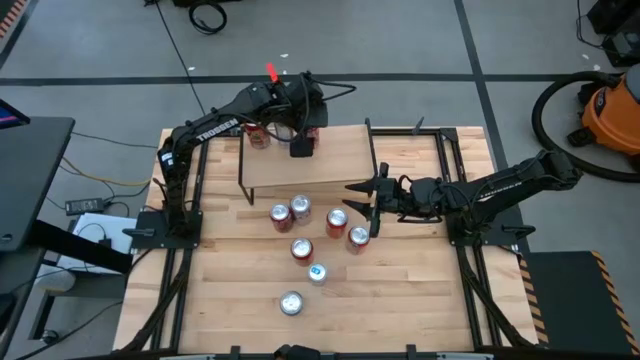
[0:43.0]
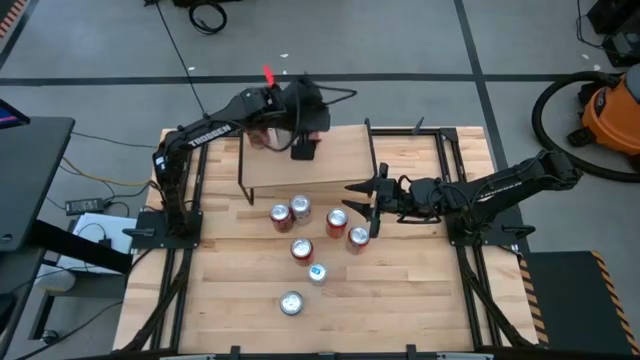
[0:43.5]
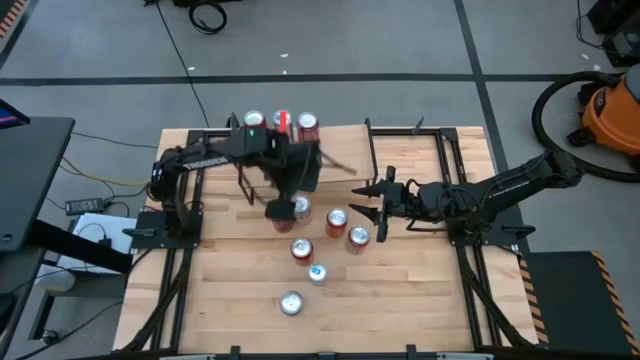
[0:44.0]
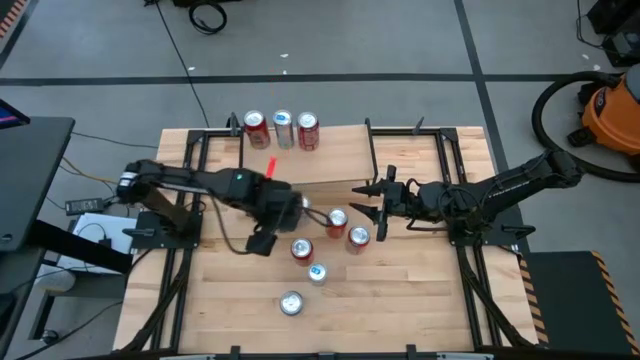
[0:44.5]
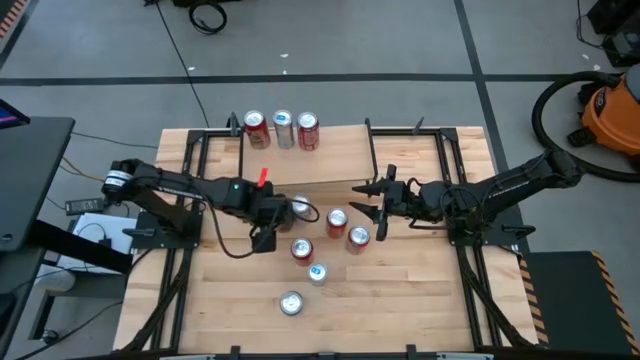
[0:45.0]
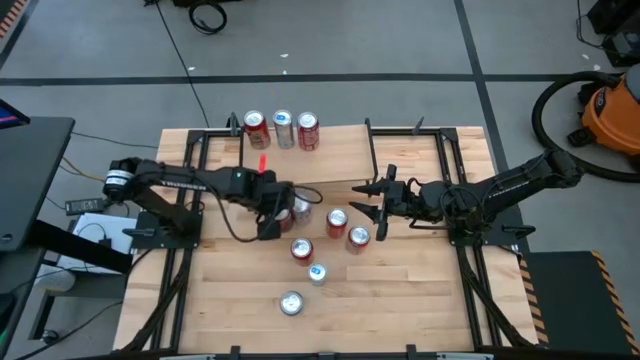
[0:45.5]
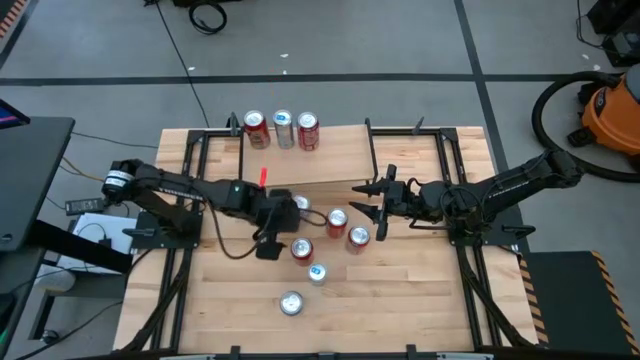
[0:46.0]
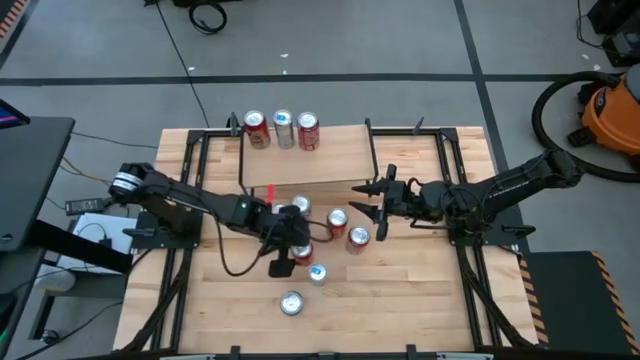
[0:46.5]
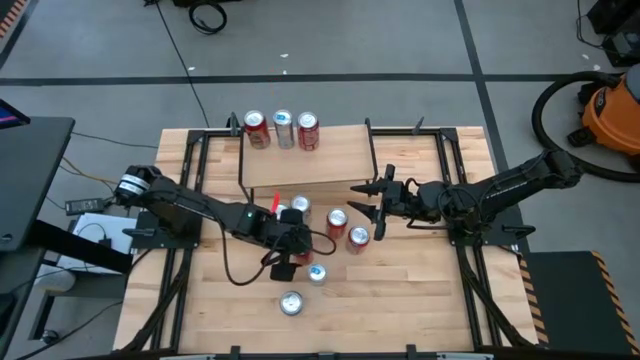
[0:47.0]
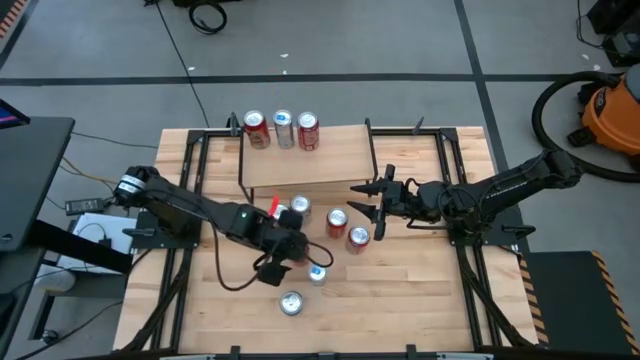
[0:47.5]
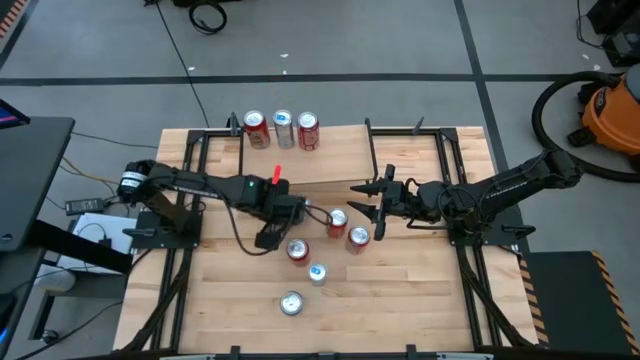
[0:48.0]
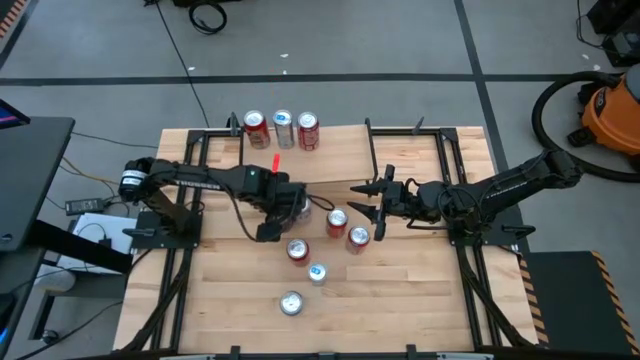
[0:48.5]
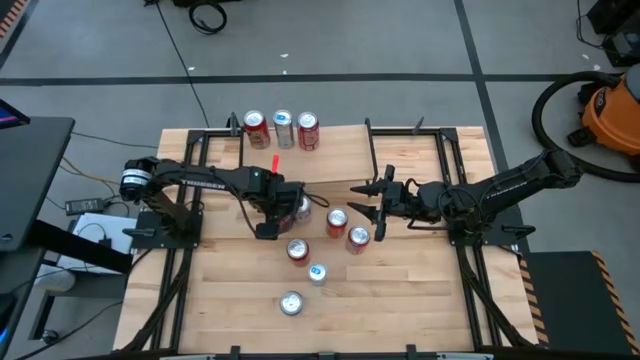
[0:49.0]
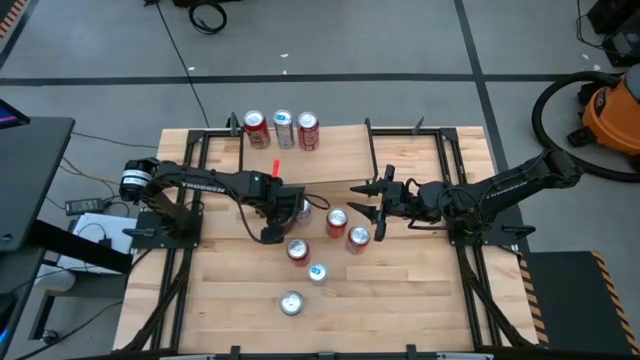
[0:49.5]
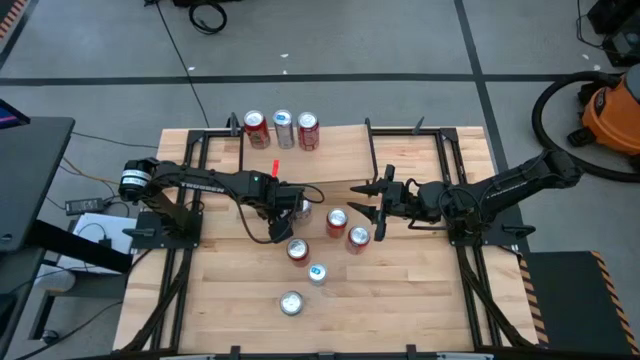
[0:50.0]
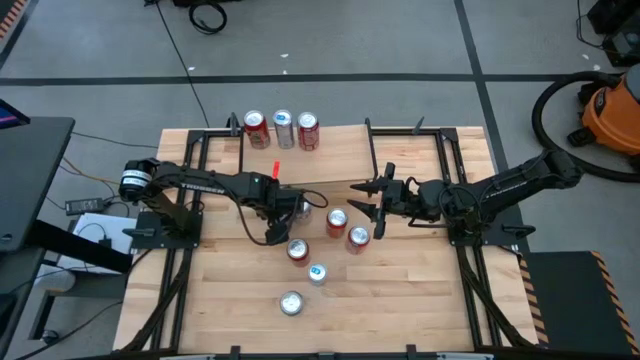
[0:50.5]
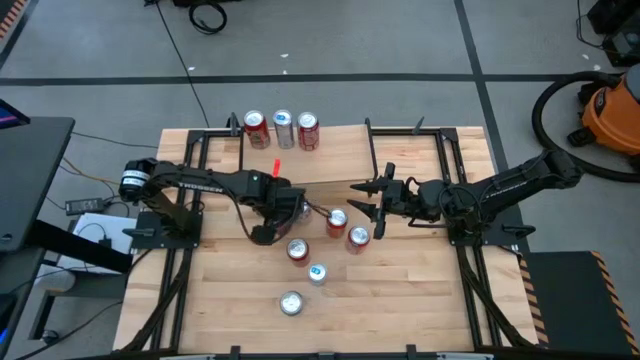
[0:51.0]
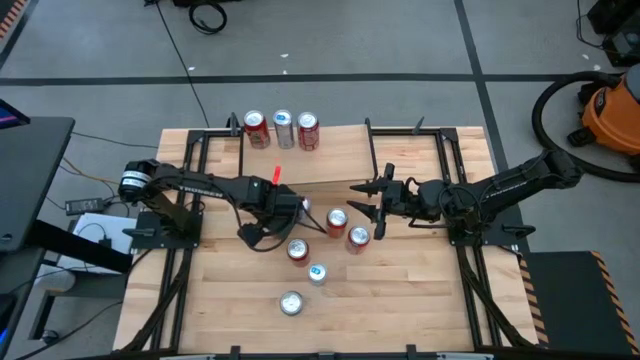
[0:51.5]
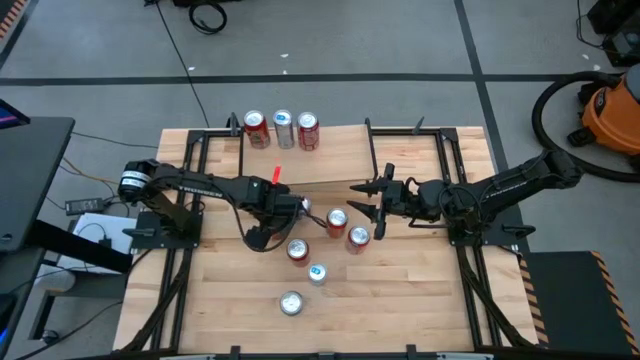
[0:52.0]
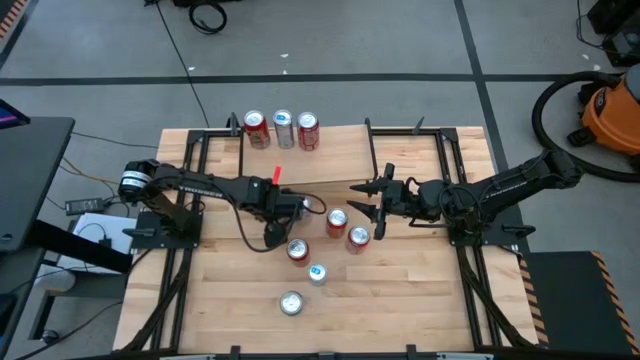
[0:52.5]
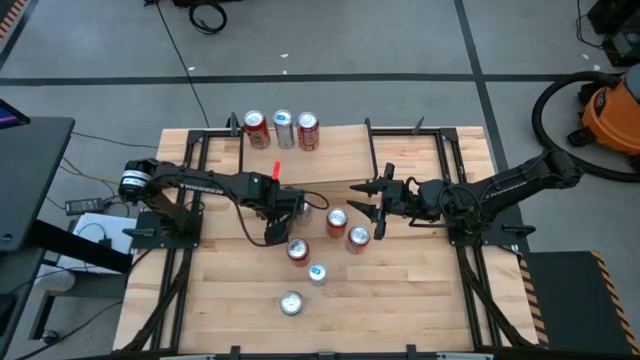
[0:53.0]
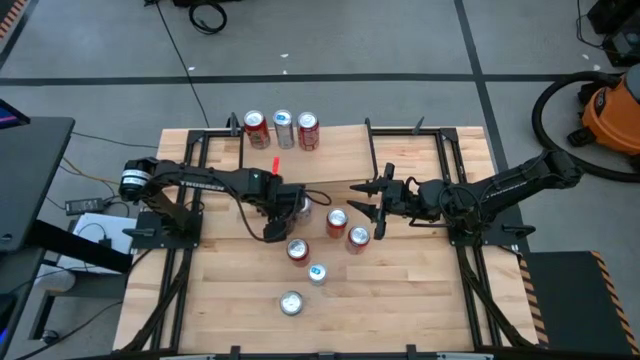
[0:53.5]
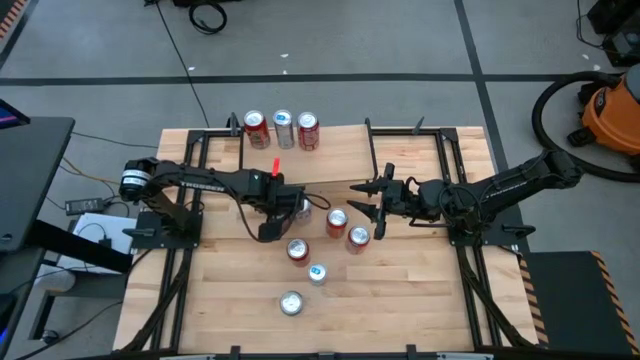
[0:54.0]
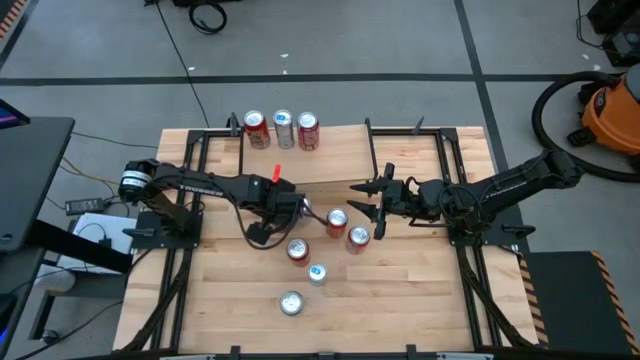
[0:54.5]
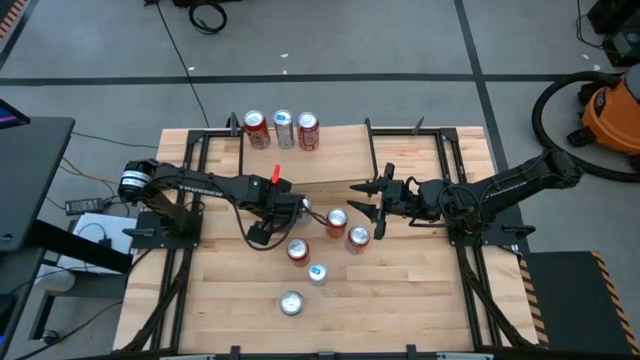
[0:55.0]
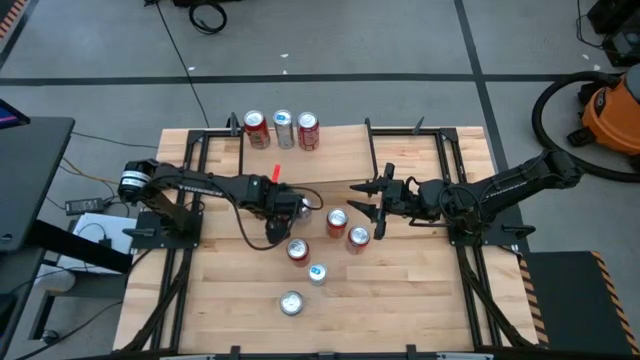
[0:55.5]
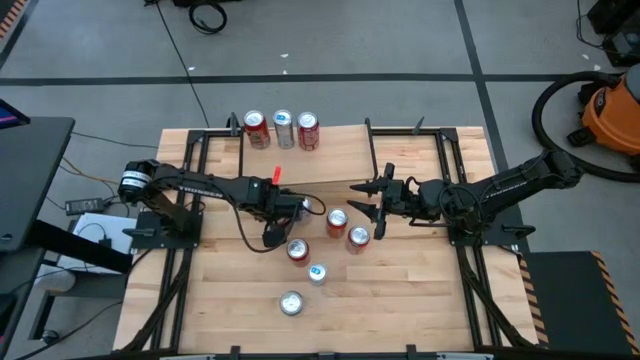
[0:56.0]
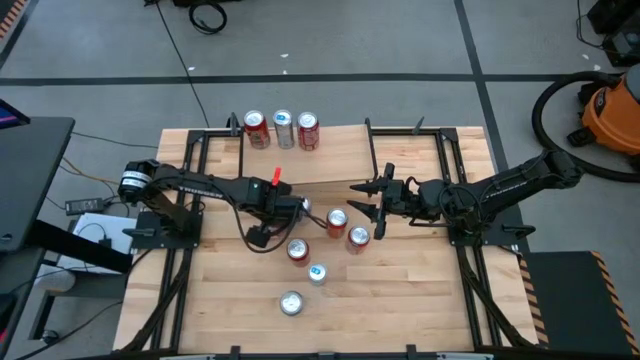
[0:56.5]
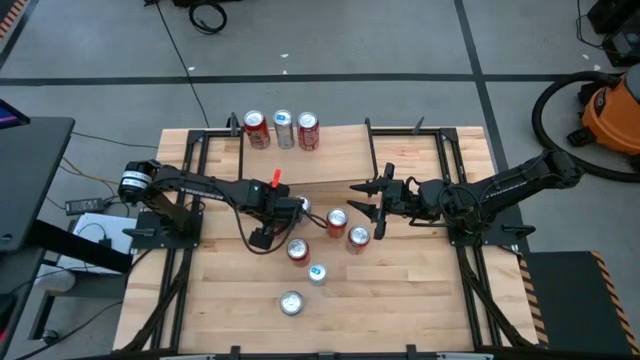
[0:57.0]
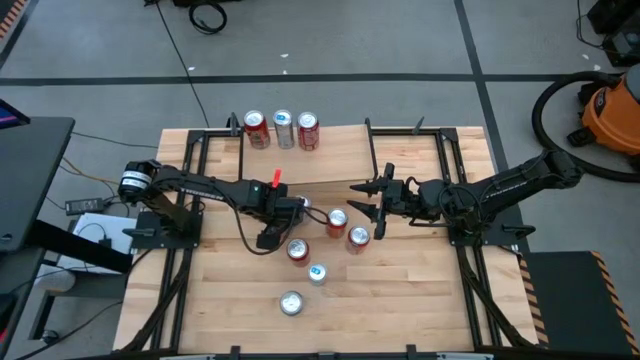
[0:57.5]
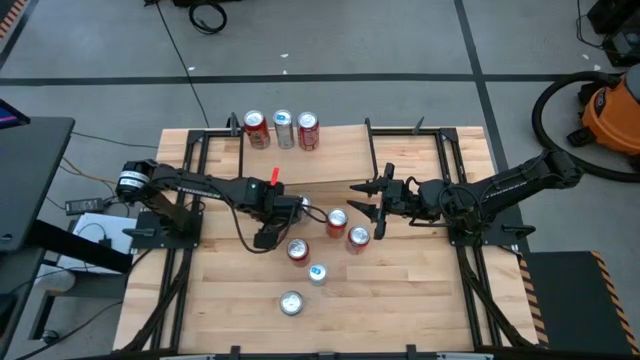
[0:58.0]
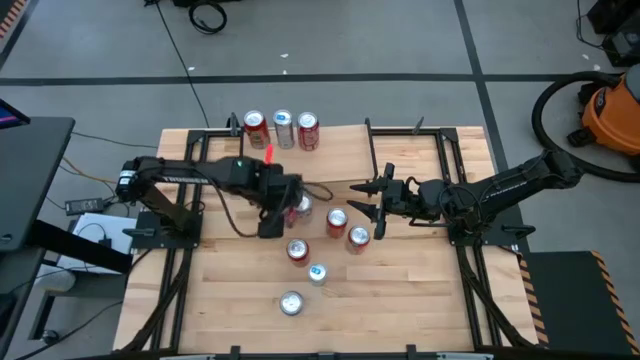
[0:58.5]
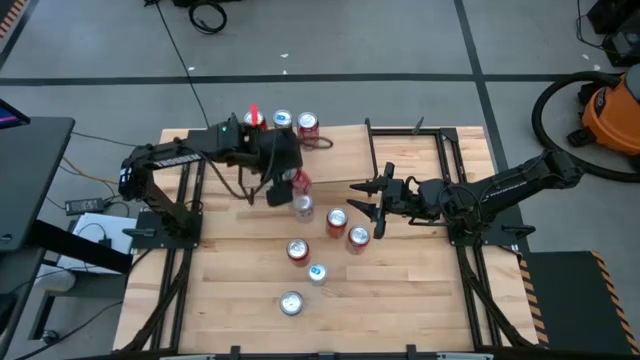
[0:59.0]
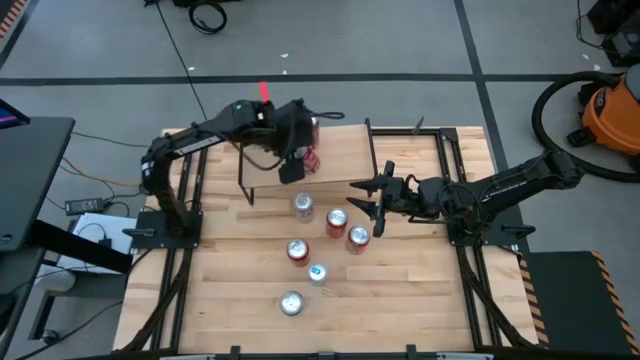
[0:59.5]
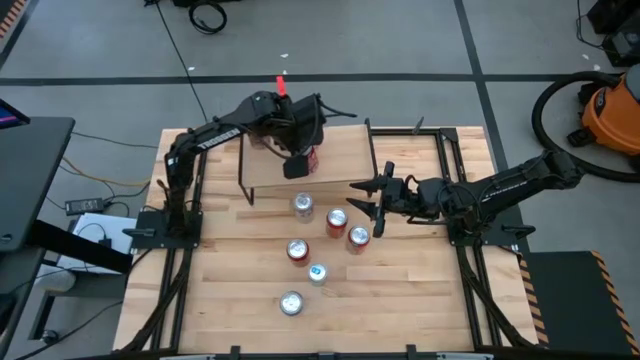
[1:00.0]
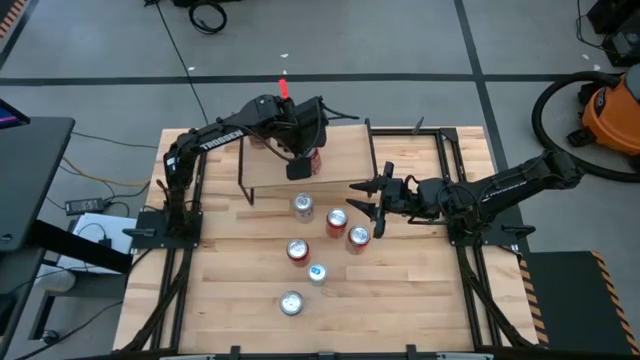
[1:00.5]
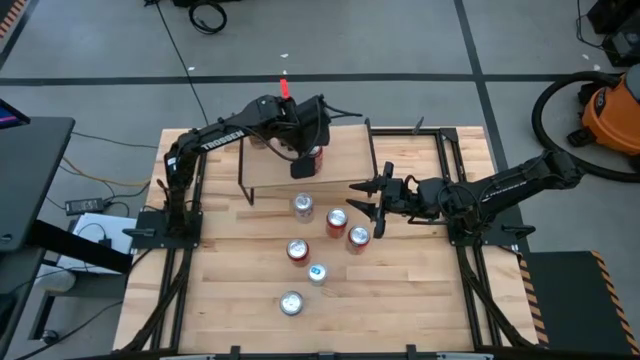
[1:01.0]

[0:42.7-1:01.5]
Task: Place canned beverage on shelf
Put the red black soda can on the shelf
